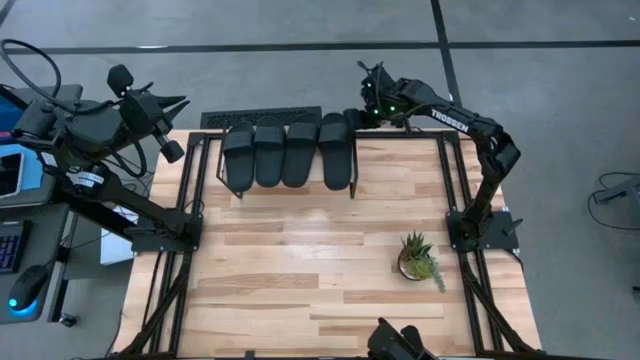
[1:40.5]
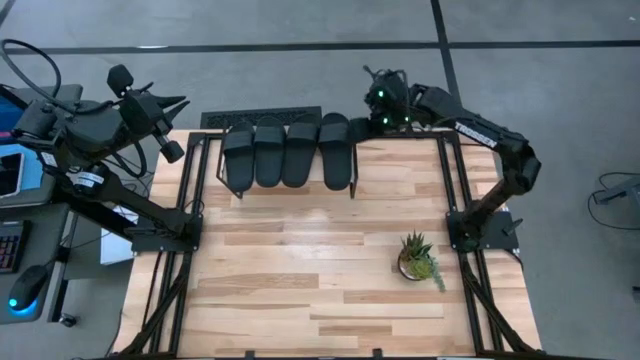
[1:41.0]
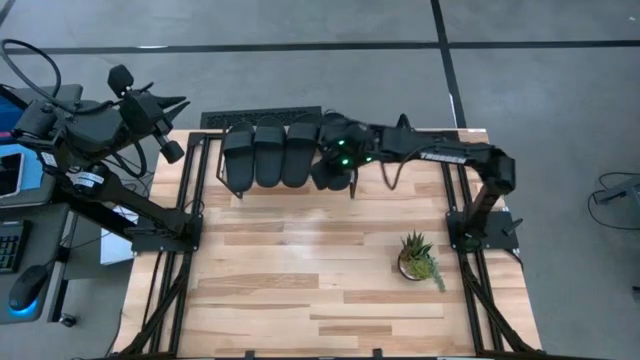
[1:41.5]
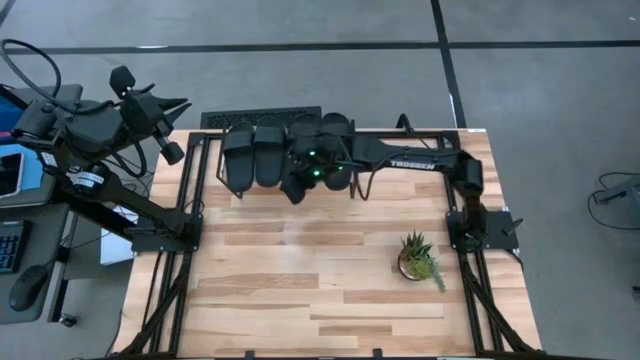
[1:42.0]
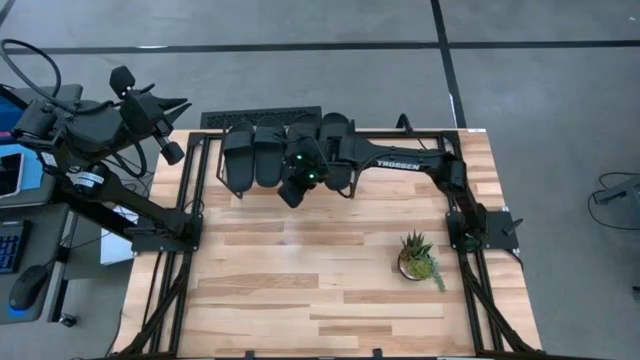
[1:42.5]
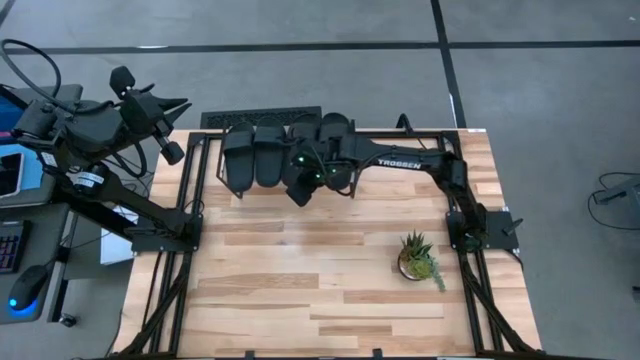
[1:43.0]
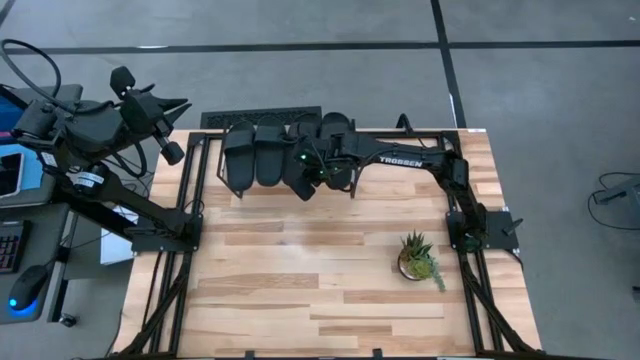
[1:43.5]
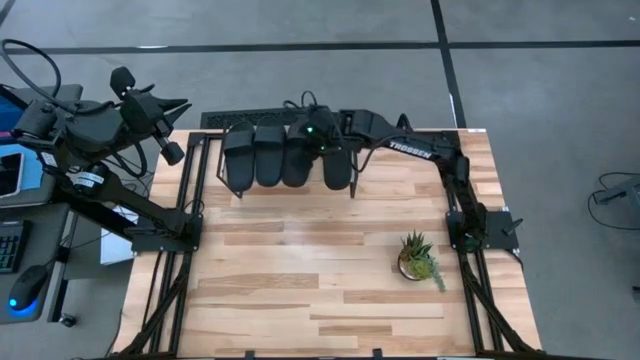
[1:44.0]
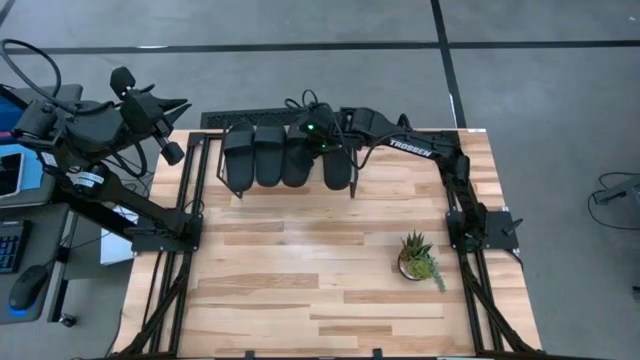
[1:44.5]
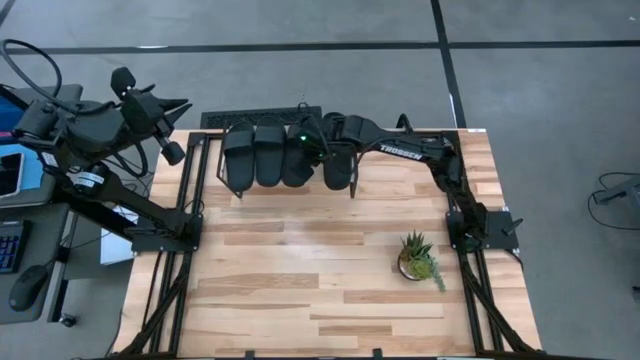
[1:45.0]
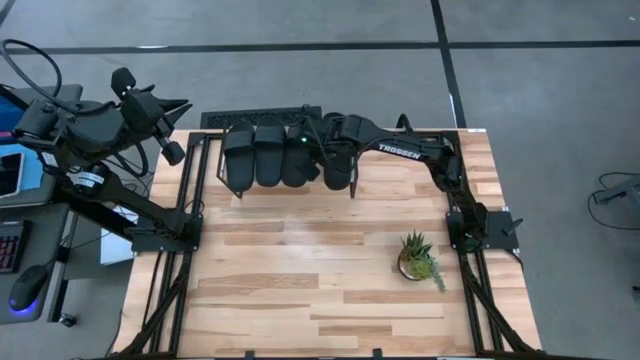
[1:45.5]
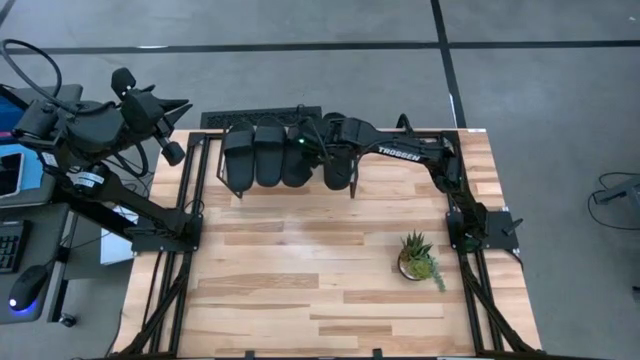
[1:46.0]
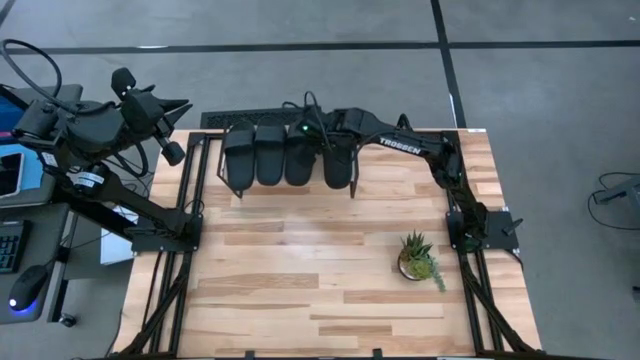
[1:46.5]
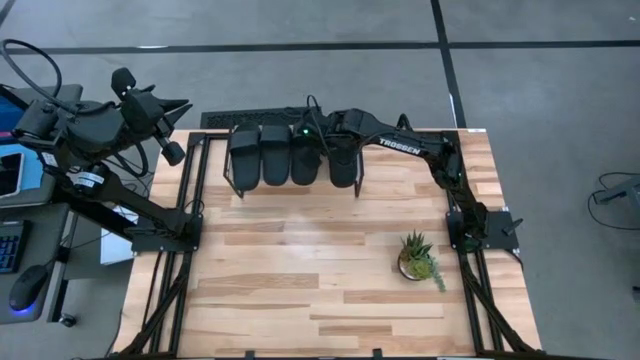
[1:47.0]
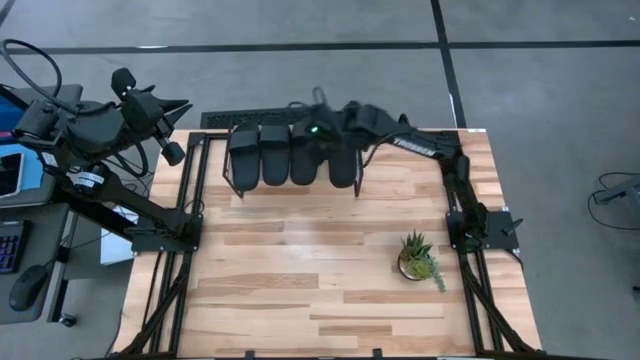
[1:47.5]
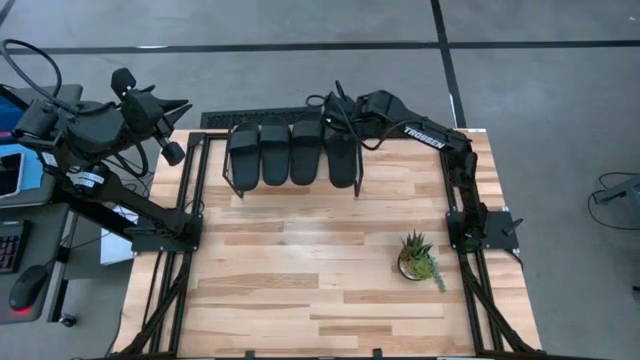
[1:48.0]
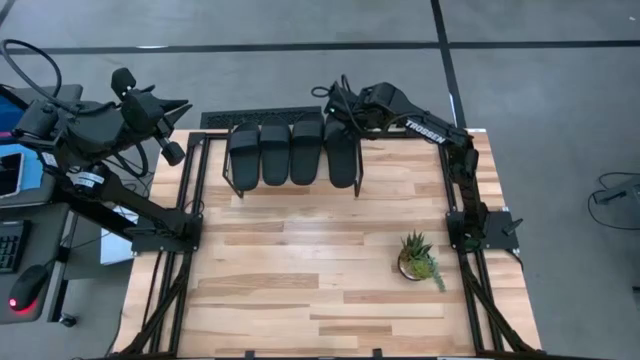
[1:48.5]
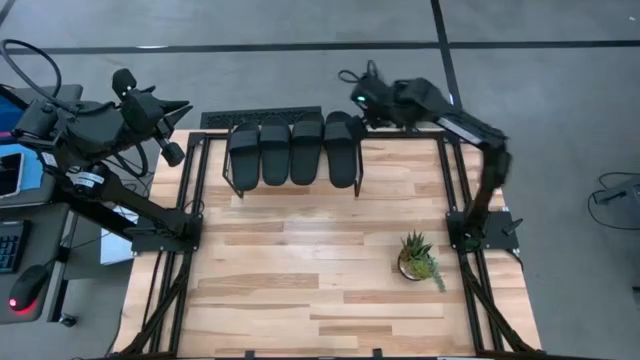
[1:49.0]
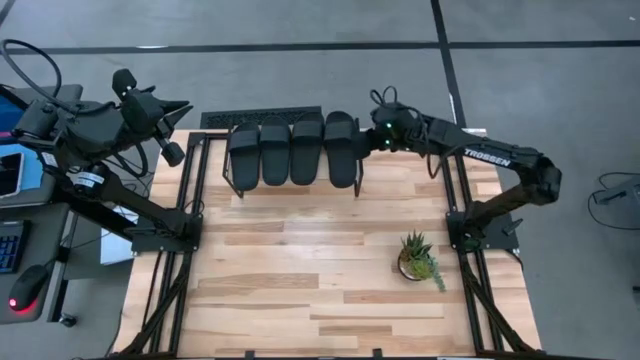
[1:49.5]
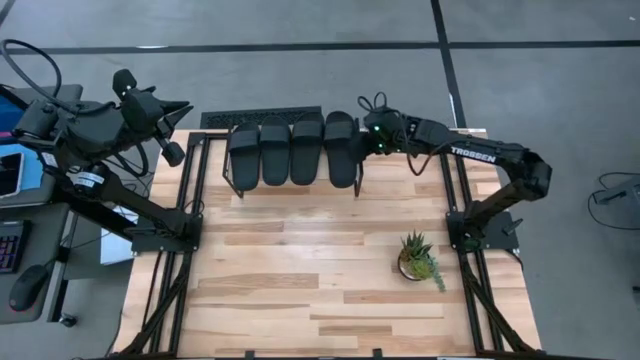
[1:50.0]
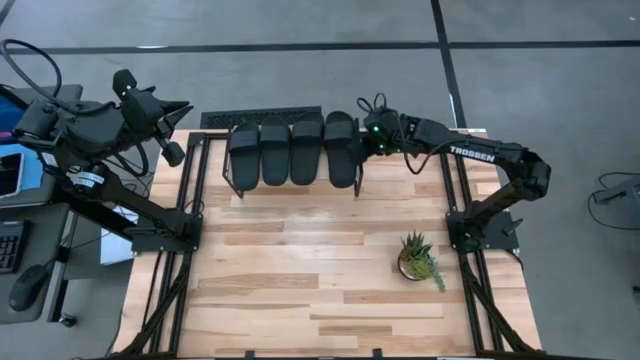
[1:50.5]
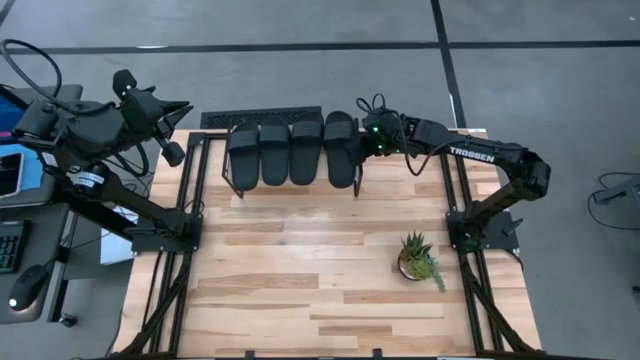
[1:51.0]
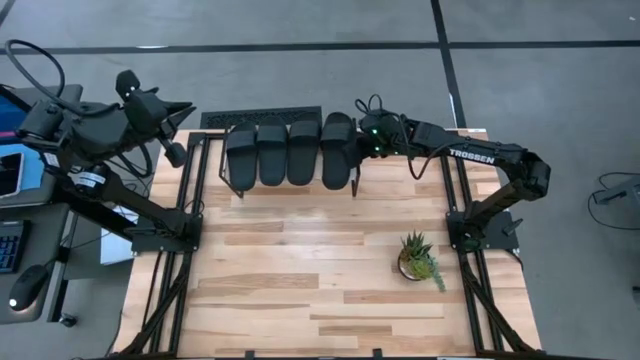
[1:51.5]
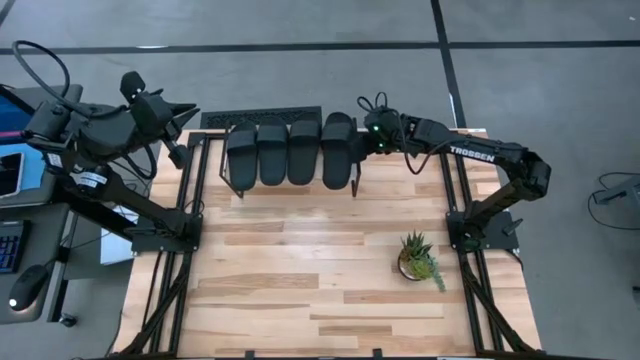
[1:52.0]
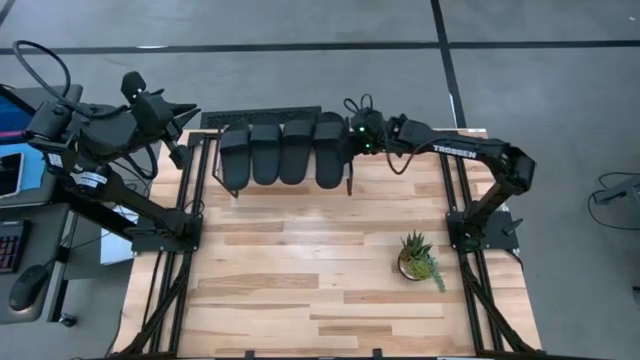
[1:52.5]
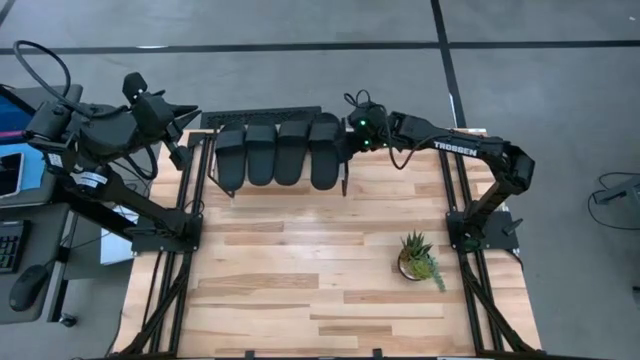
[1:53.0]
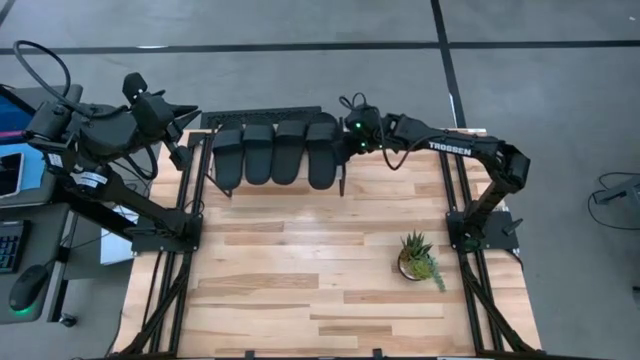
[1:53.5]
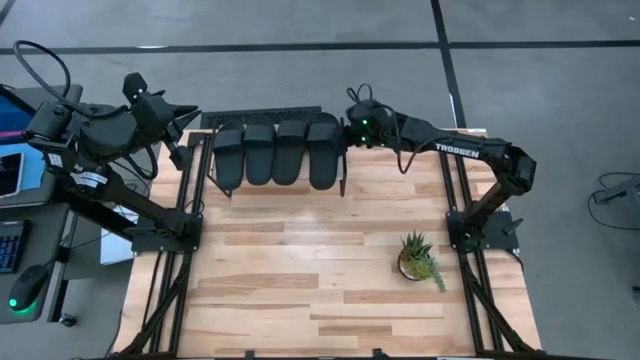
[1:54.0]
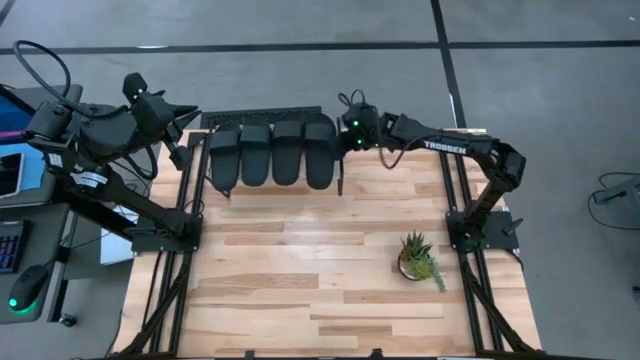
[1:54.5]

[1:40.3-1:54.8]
Task: Pick and place slides into the shelf
Adjust the black slippers on the shelf

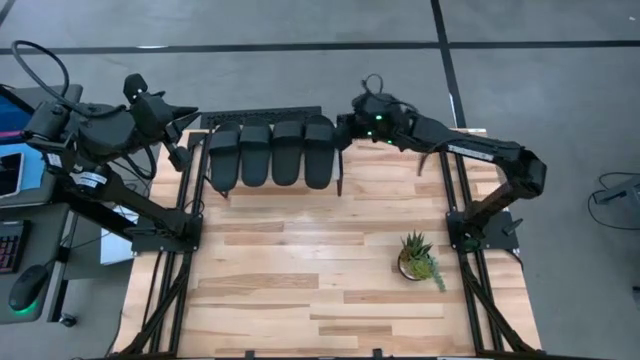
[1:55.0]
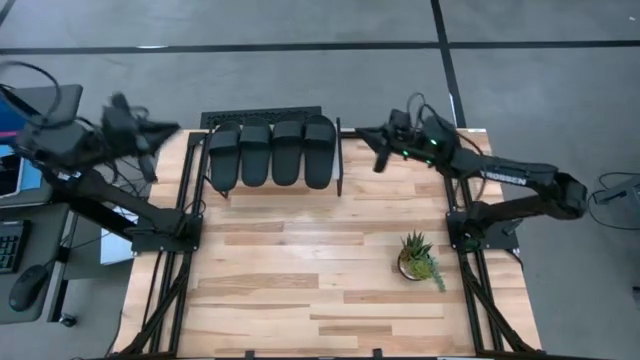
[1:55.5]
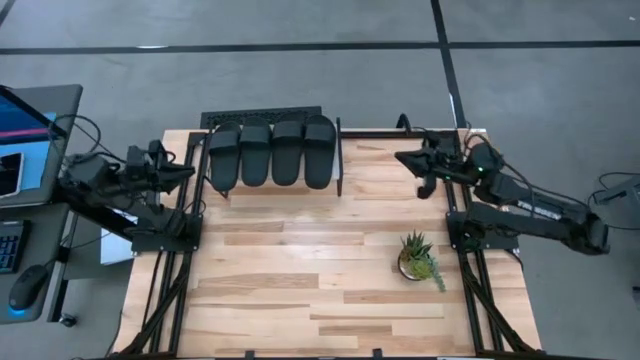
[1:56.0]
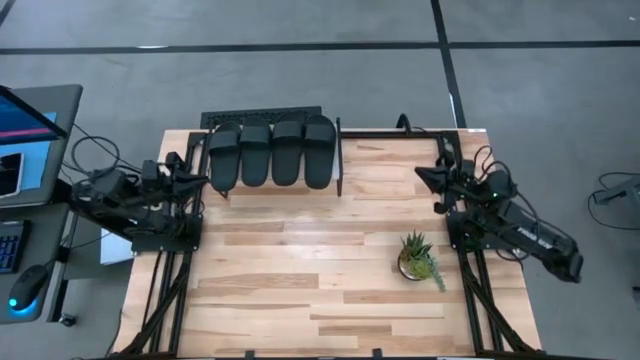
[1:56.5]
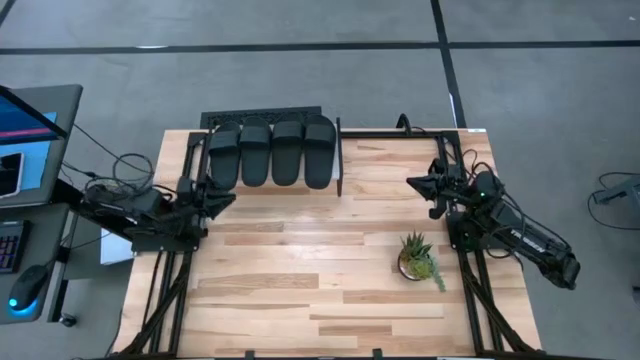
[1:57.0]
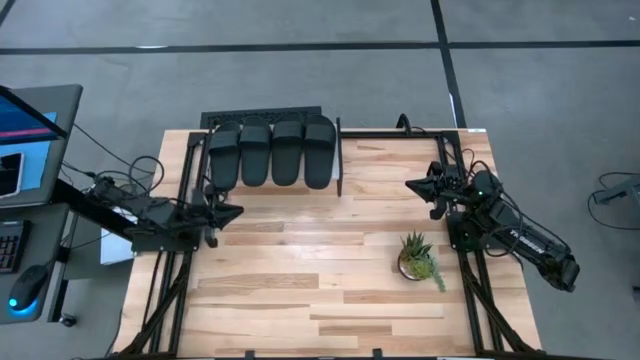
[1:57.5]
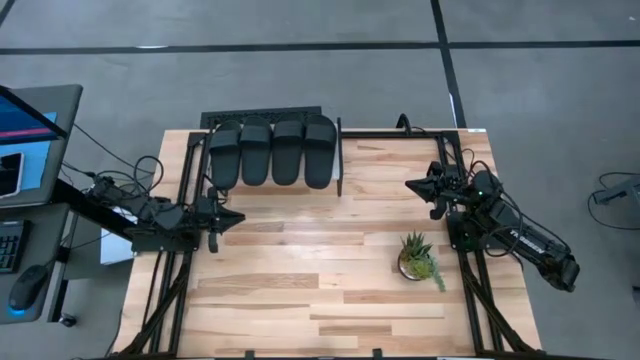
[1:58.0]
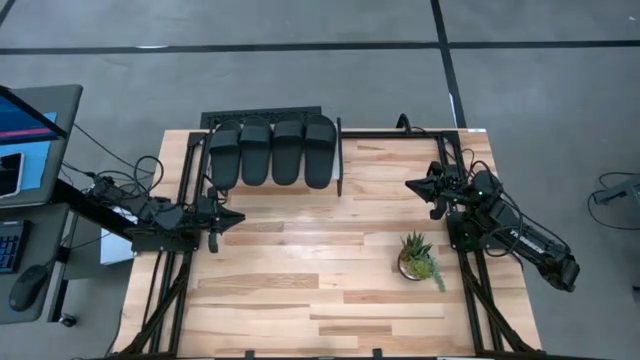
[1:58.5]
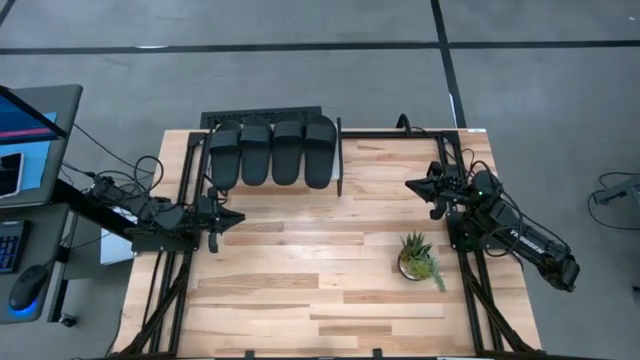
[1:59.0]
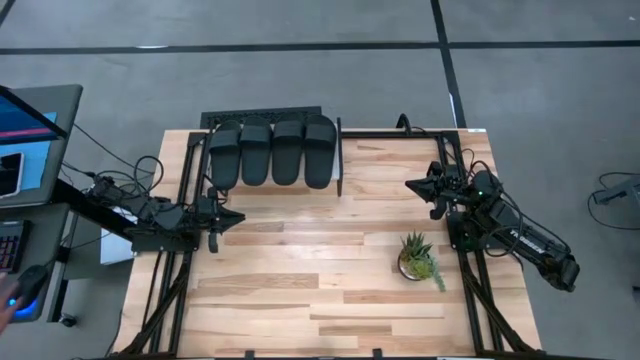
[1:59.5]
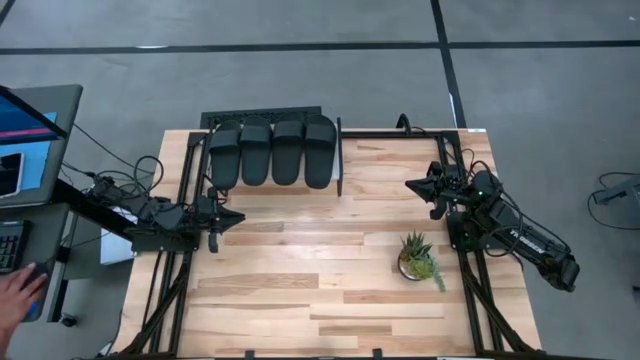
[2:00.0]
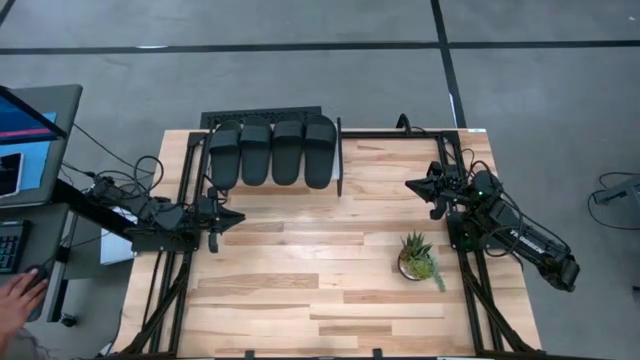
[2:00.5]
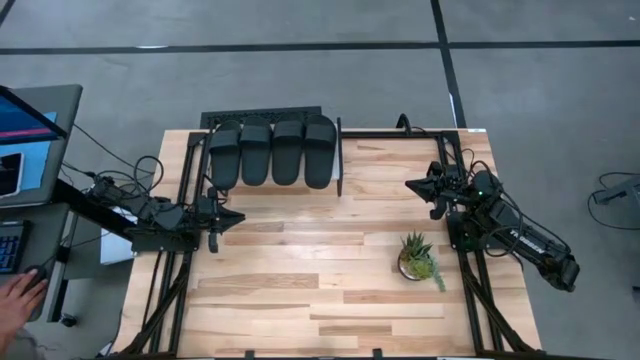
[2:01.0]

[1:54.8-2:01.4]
Return to Home Position

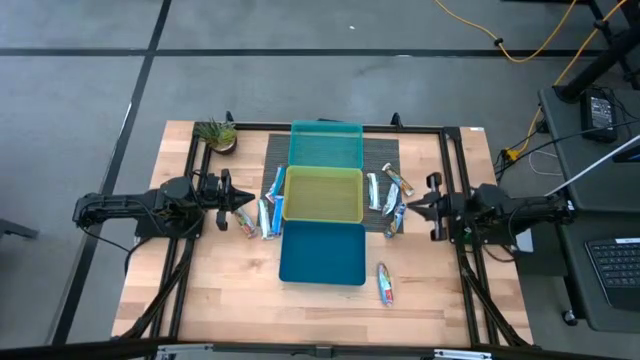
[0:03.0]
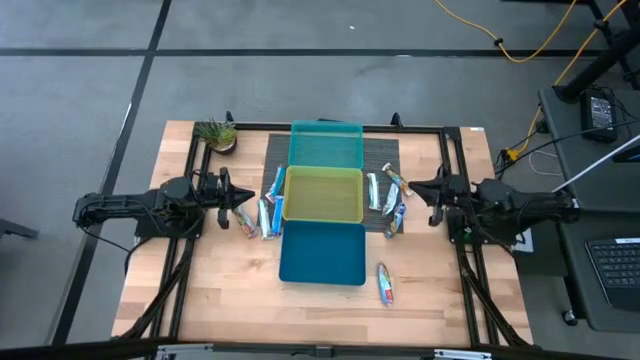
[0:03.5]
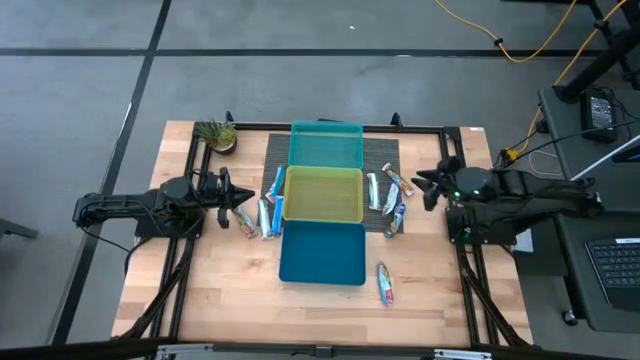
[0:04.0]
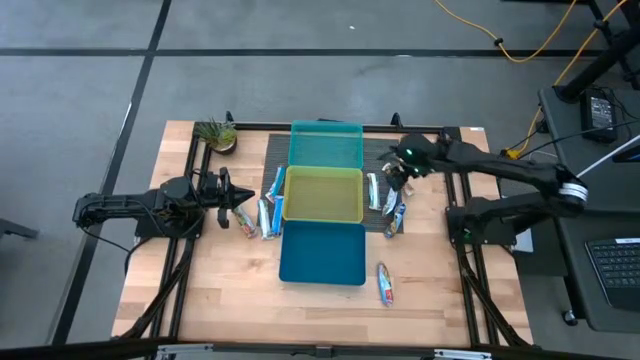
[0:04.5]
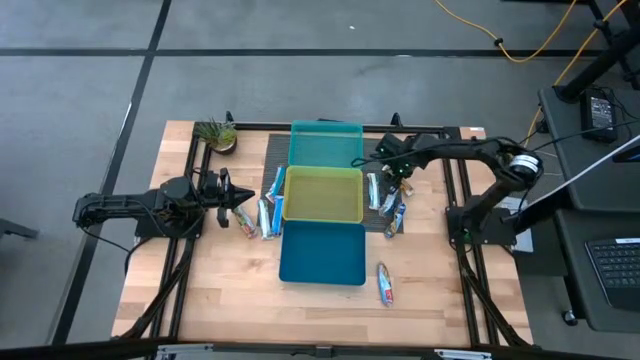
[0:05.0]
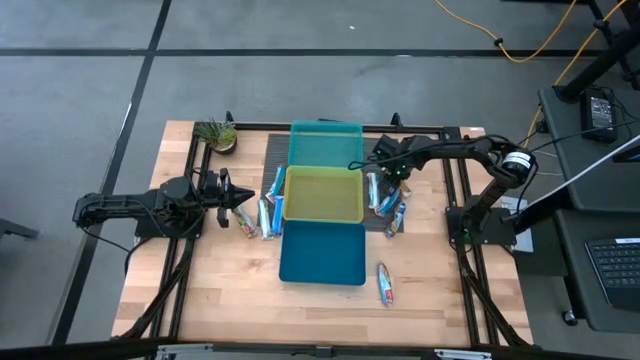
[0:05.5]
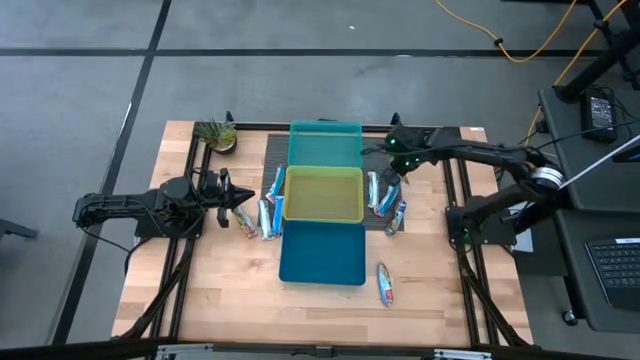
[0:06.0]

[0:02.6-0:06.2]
Task: Pick and place Granola Bars by type
Put the yellow granola bar into the yellow bin
